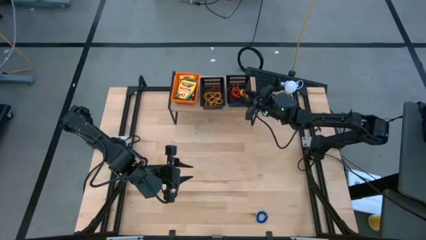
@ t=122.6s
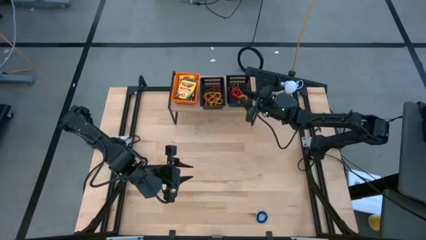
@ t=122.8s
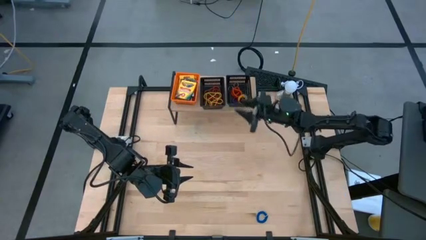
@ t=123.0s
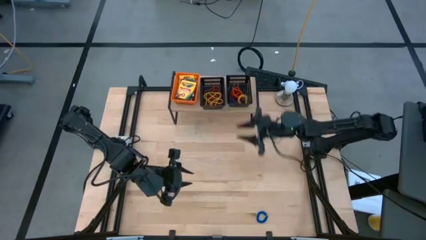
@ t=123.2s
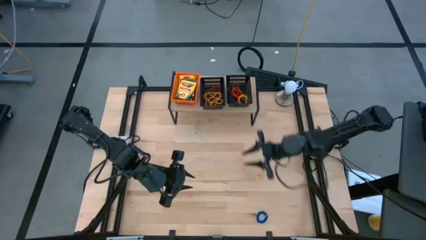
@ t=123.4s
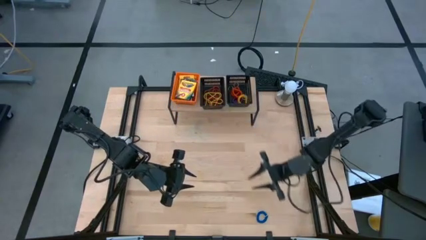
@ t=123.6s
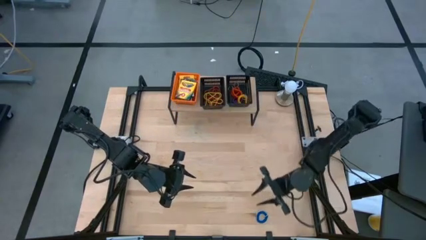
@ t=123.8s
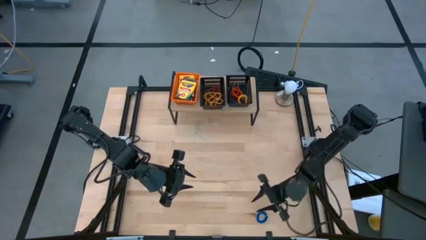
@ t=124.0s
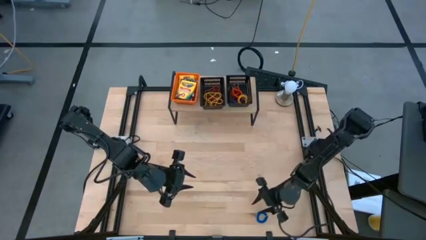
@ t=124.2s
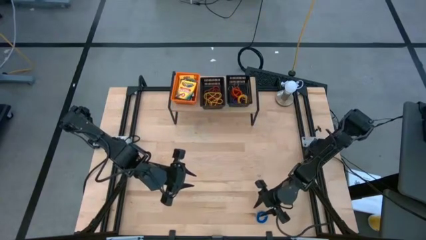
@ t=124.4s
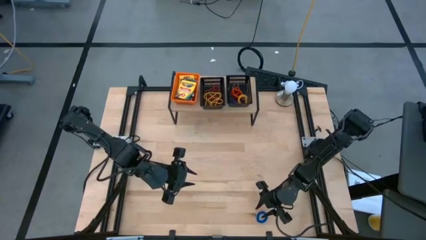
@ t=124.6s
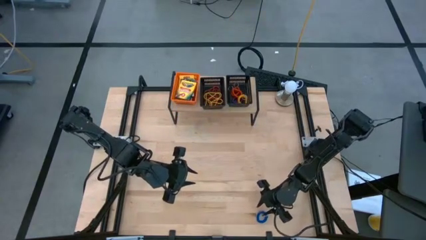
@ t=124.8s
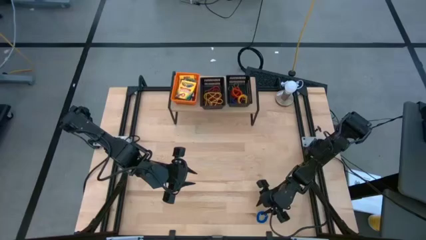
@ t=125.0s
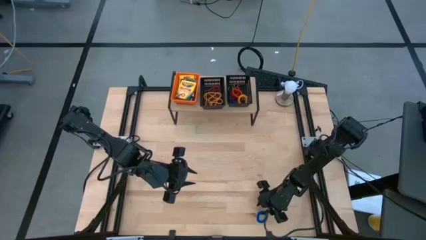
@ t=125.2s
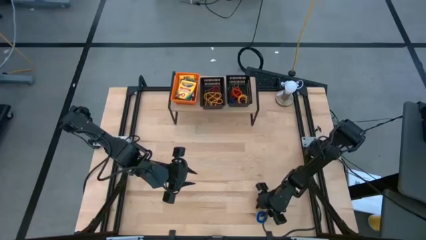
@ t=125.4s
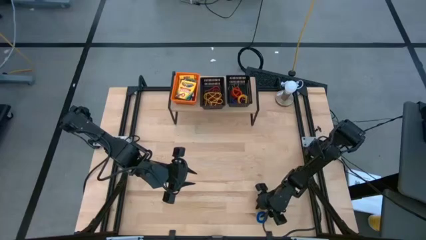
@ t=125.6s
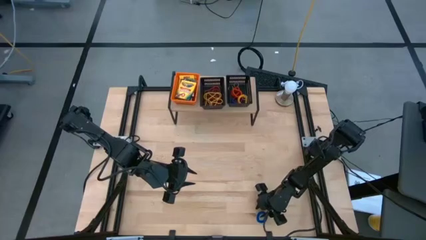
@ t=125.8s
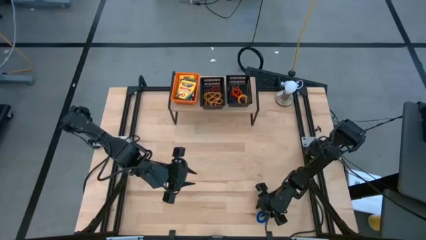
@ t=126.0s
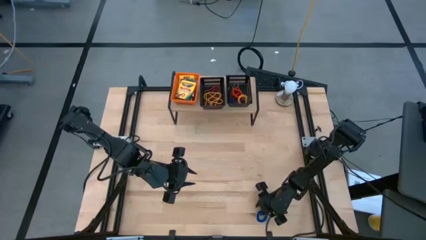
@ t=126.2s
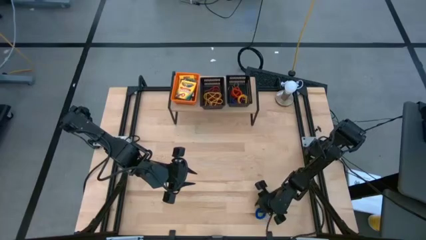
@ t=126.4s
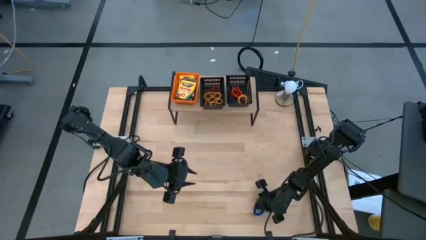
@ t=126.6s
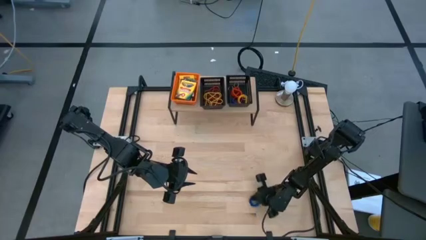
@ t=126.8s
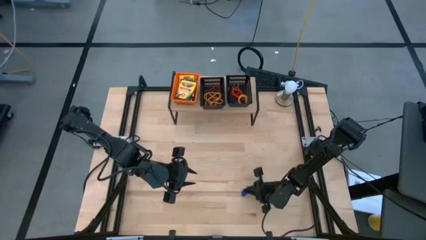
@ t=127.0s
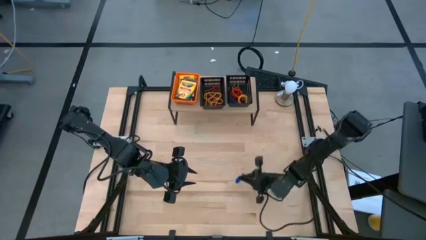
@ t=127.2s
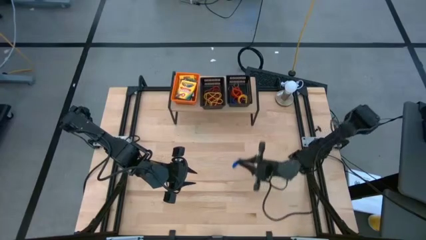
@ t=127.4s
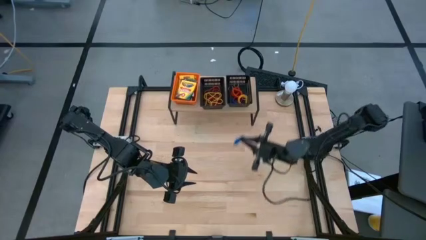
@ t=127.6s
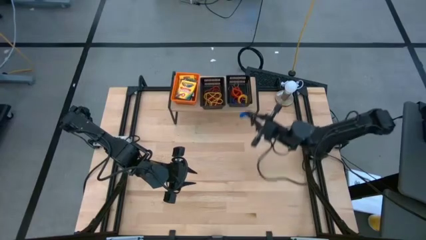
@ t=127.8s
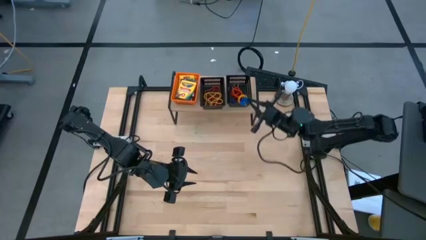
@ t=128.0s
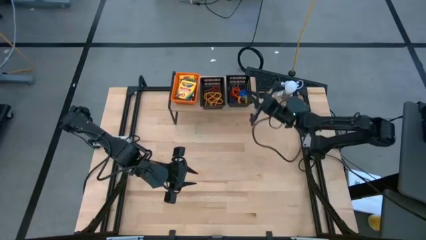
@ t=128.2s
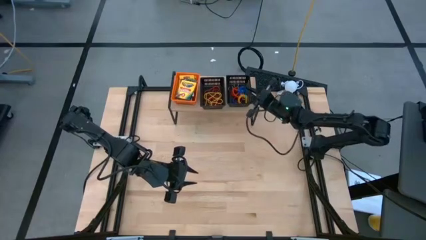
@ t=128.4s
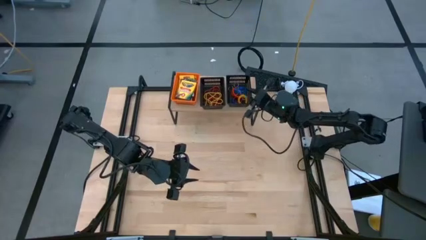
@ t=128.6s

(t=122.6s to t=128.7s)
Task: Pick & Place Office Desk Supplies
Put the blue spring keychain into the right black basket on the shelf

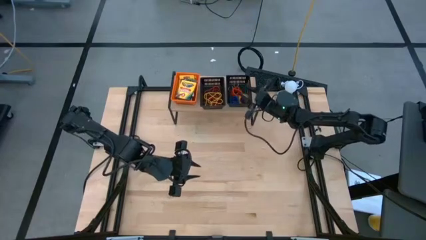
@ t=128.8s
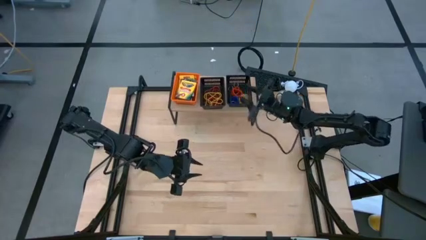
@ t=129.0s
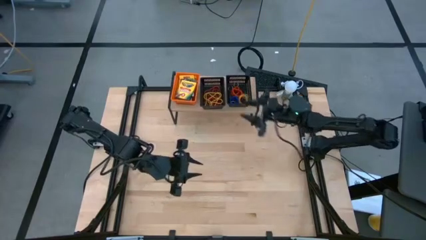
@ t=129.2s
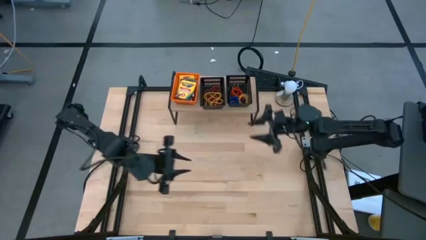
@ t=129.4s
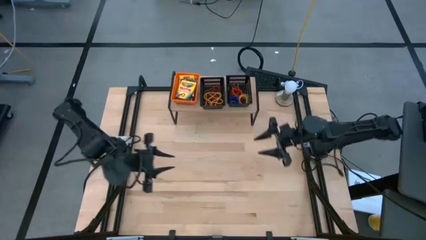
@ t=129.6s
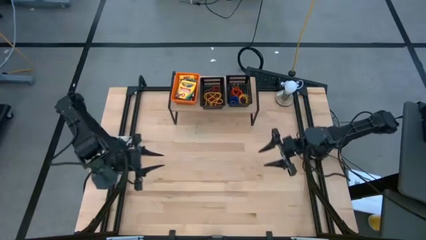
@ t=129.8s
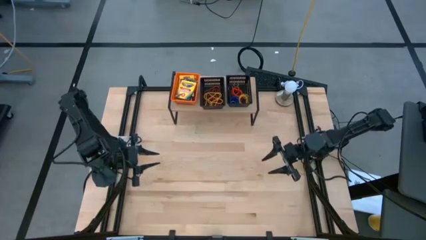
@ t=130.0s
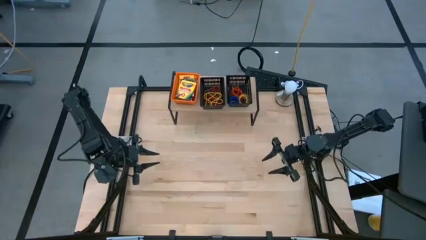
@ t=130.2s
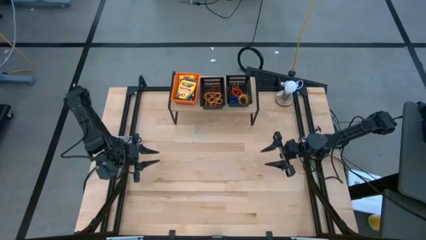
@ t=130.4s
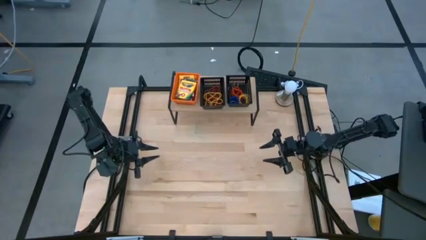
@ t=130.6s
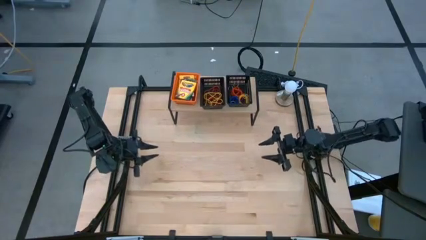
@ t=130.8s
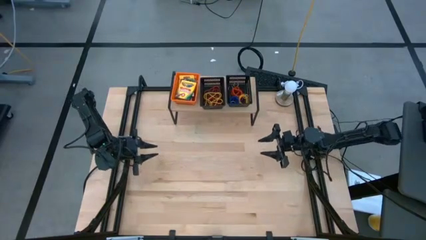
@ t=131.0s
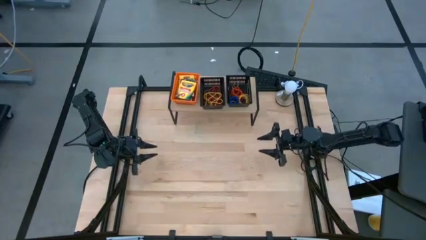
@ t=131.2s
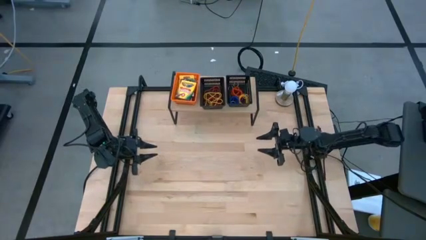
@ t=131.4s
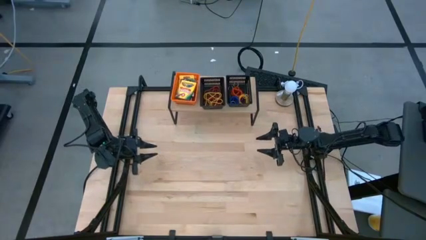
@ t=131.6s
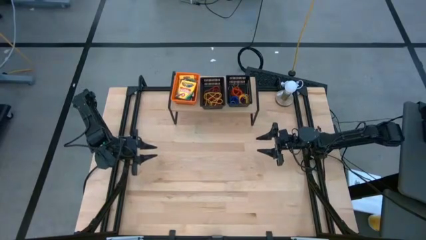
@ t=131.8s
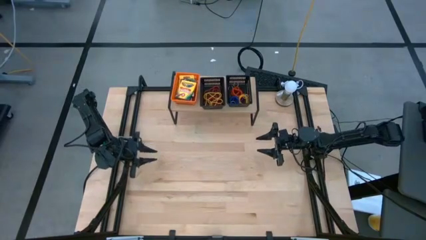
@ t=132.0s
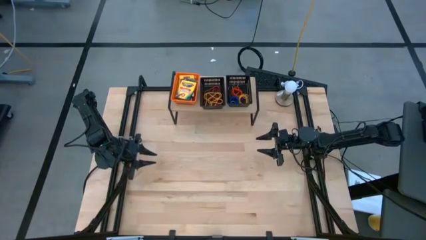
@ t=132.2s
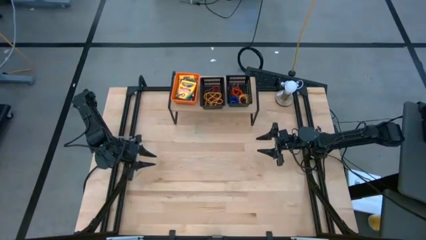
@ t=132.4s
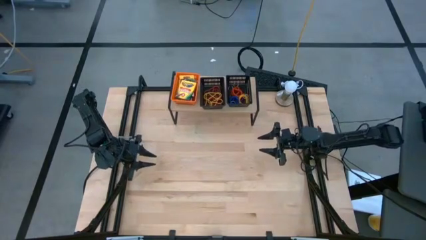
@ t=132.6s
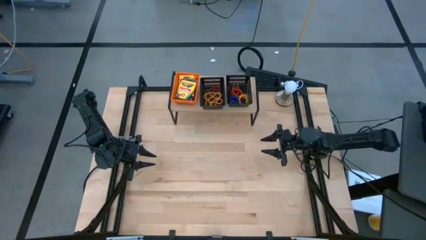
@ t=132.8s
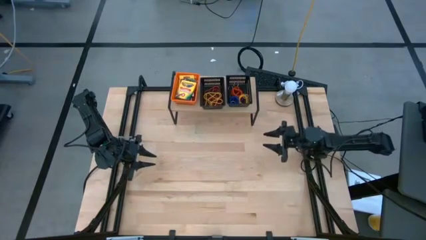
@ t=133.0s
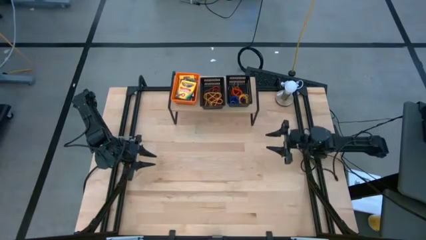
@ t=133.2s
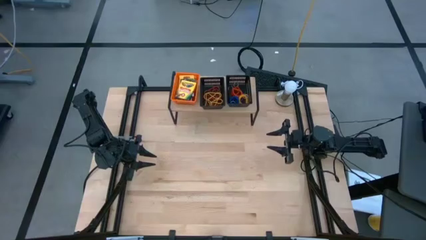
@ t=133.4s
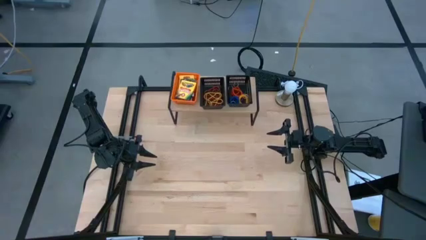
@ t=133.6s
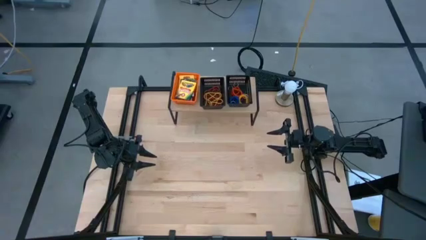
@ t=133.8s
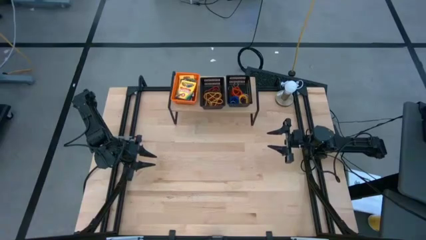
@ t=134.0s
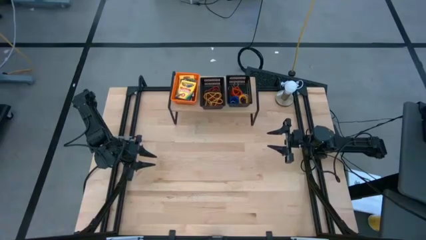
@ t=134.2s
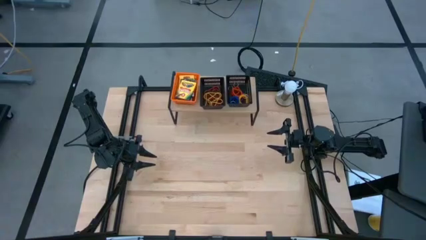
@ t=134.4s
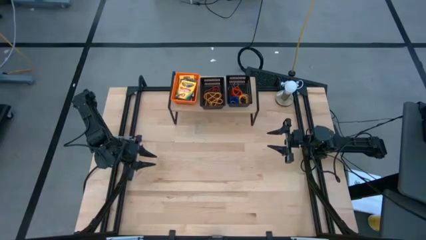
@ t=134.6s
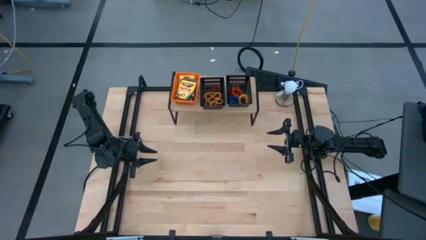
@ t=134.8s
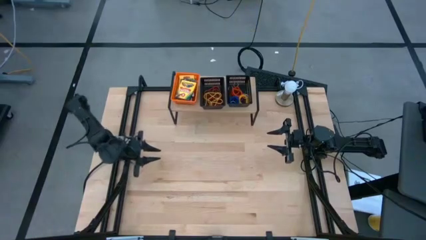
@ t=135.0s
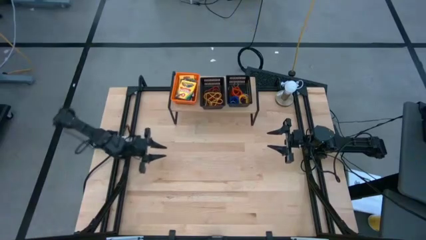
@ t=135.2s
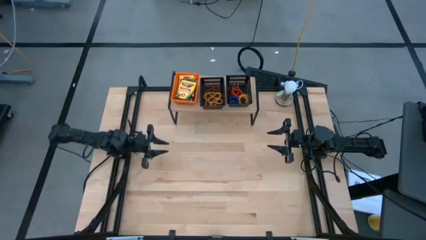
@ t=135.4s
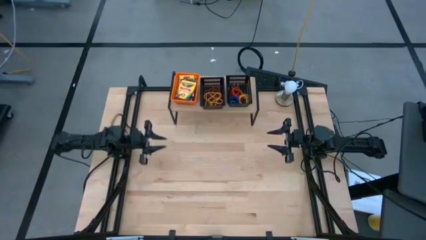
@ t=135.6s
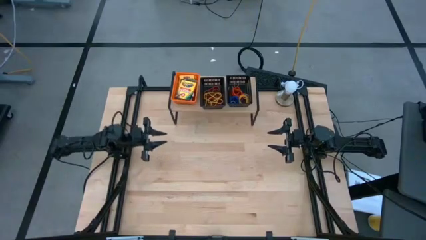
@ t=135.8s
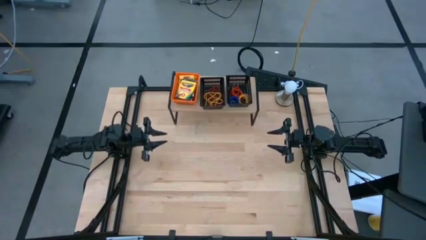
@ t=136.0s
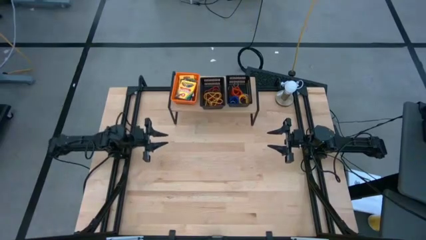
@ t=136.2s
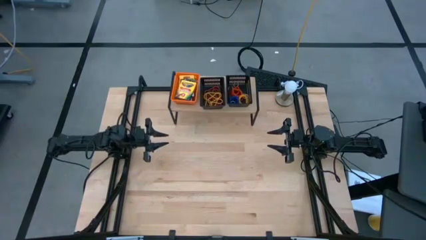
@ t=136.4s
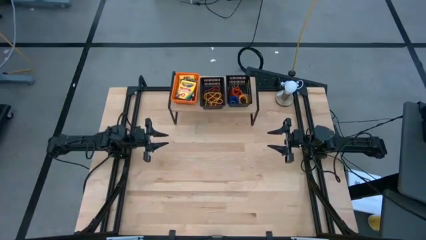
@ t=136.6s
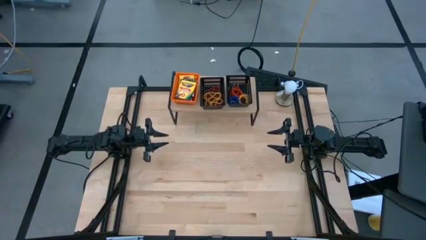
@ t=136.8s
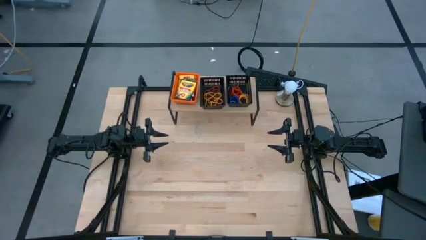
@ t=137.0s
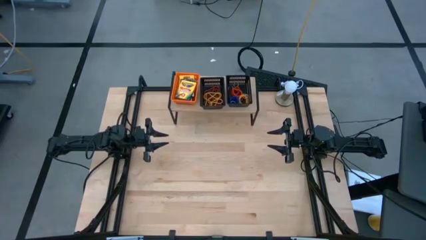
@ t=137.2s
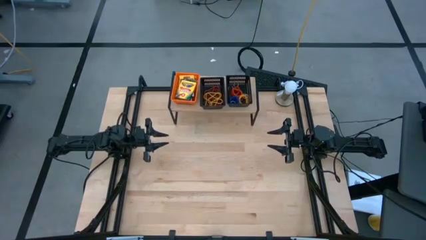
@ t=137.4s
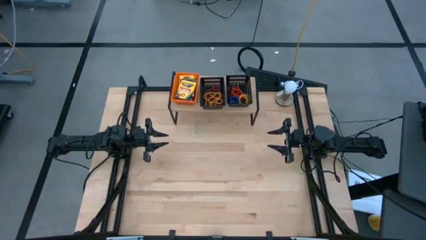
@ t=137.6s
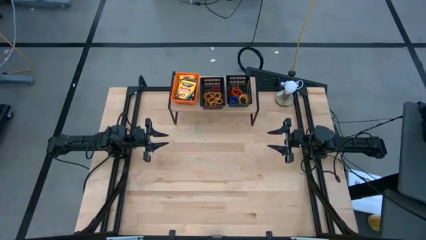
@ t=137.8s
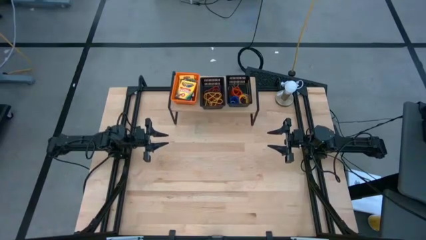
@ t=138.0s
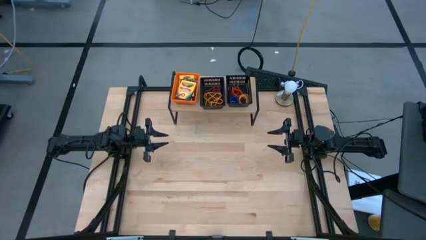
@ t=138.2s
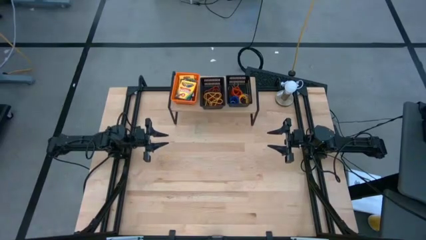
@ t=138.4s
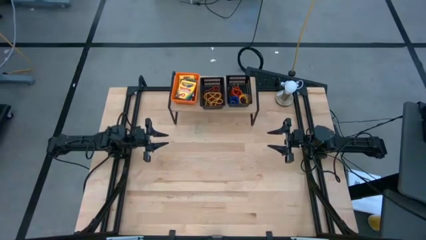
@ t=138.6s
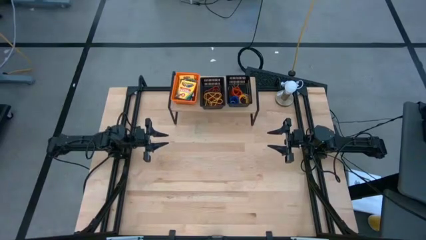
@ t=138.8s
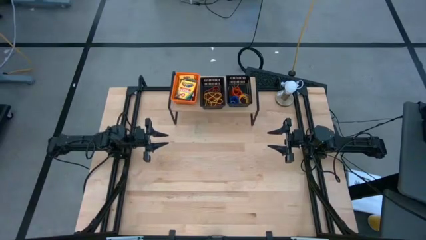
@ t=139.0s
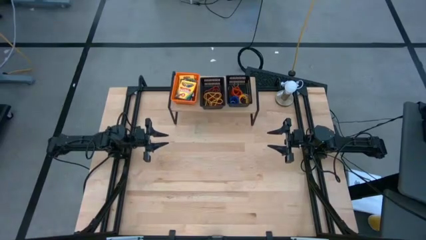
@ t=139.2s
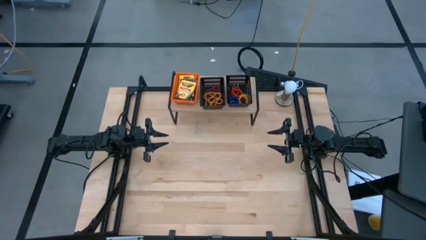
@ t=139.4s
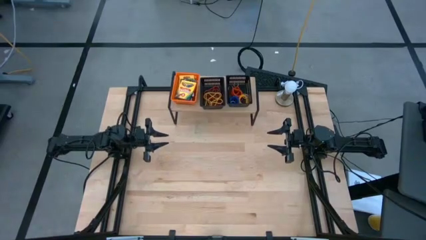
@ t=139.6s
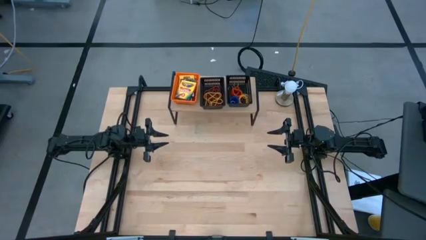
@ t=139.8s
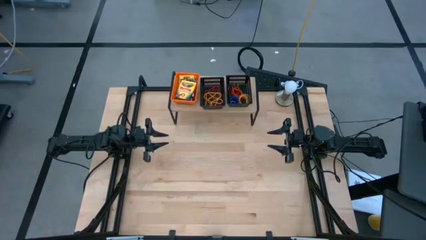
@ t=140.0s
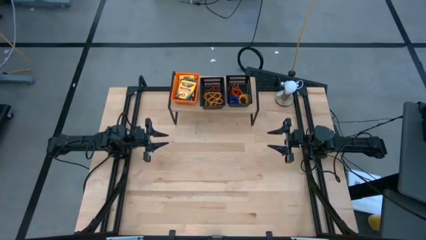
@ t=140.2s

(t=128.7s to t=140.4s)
Return to Home Position
